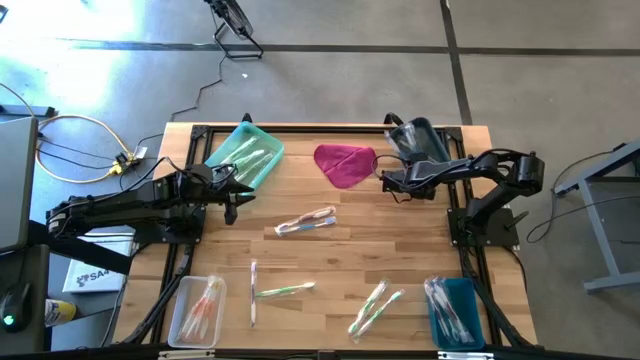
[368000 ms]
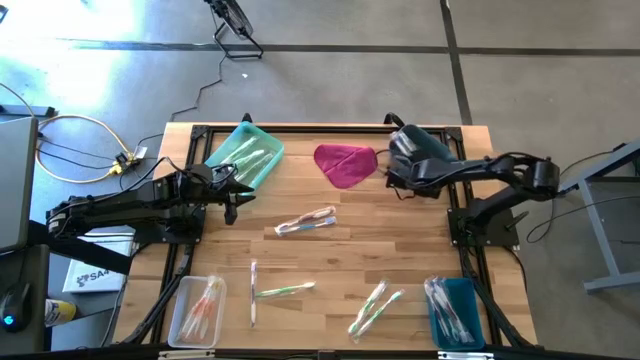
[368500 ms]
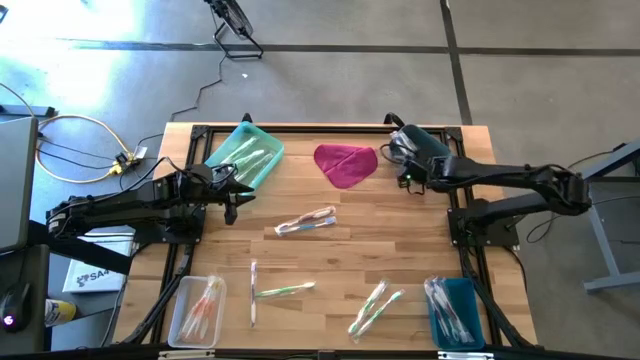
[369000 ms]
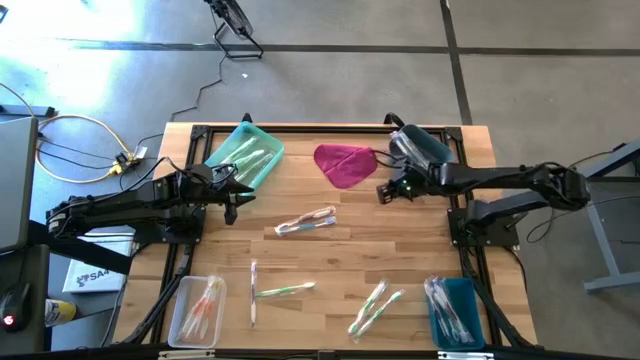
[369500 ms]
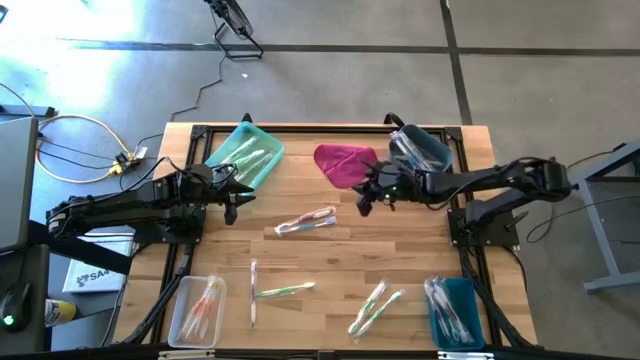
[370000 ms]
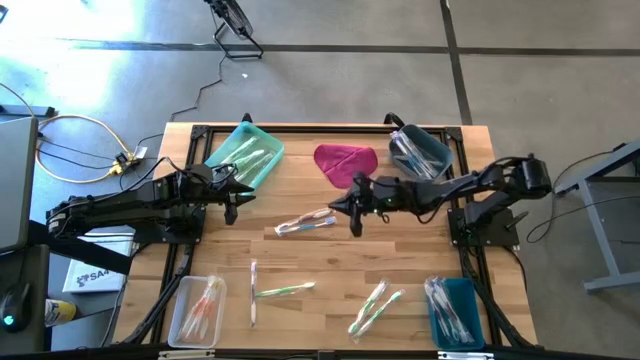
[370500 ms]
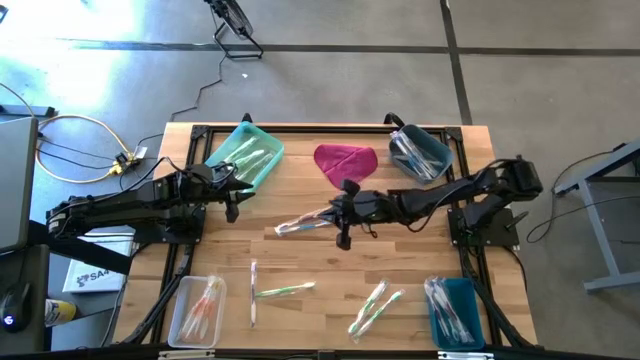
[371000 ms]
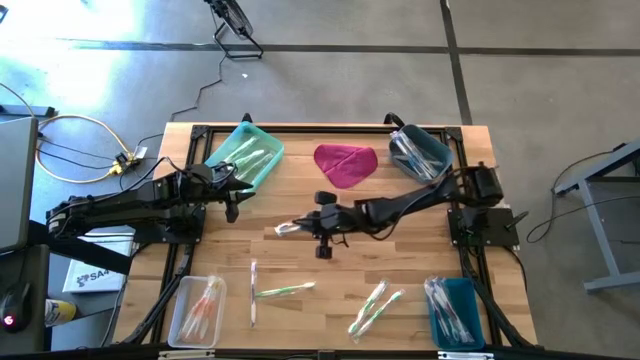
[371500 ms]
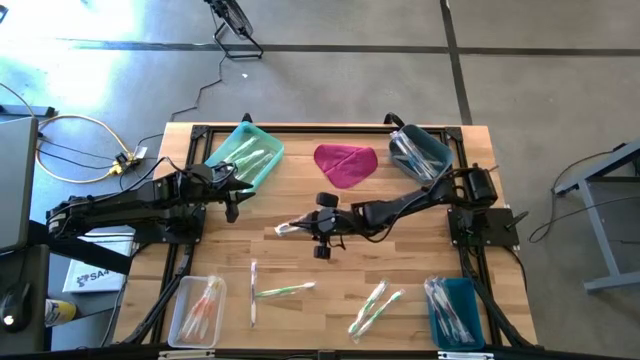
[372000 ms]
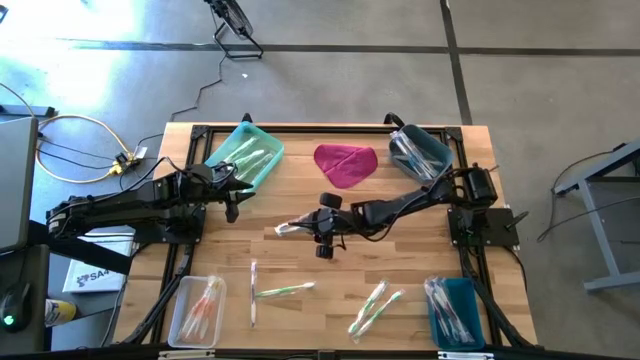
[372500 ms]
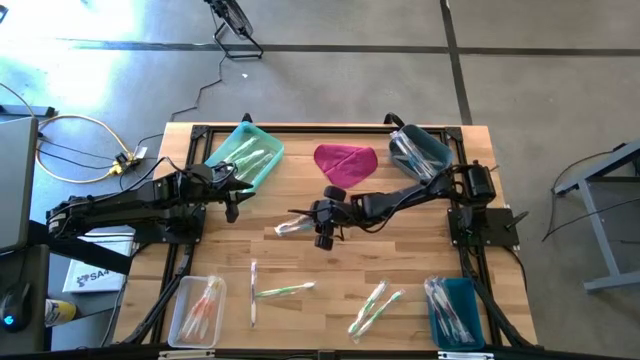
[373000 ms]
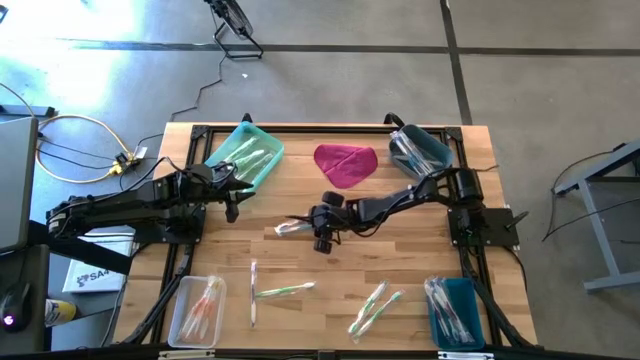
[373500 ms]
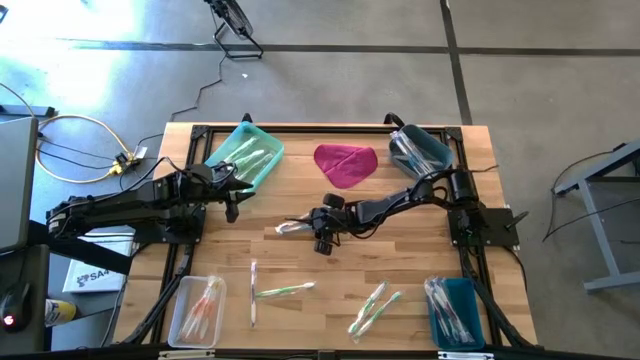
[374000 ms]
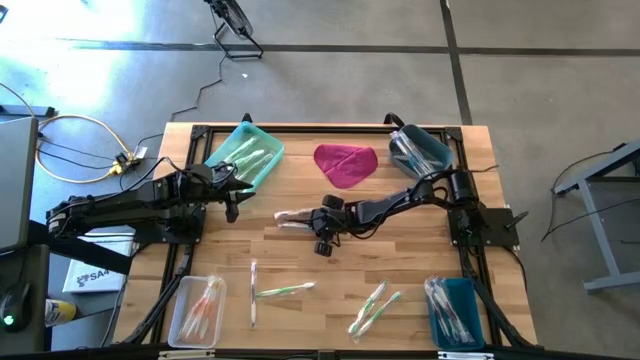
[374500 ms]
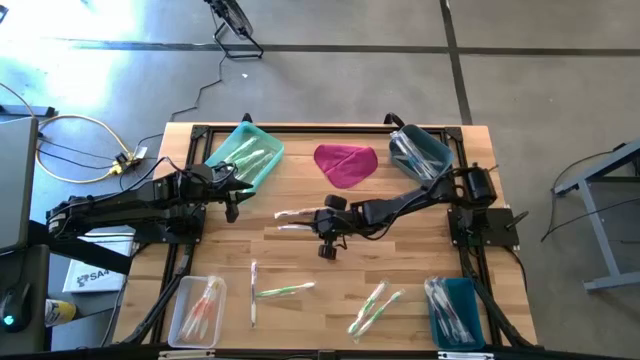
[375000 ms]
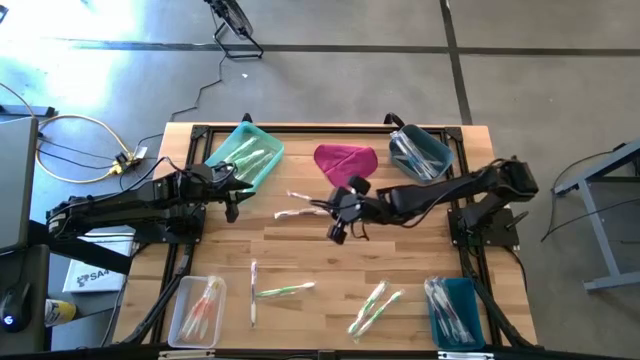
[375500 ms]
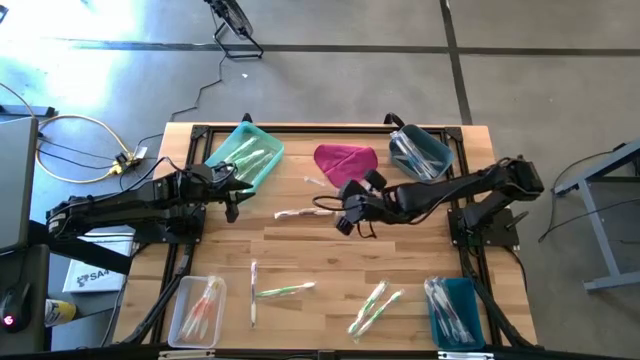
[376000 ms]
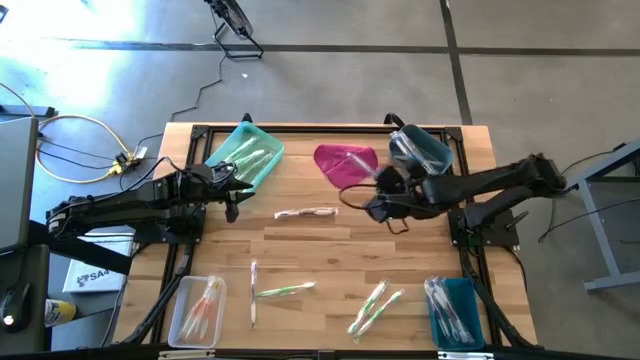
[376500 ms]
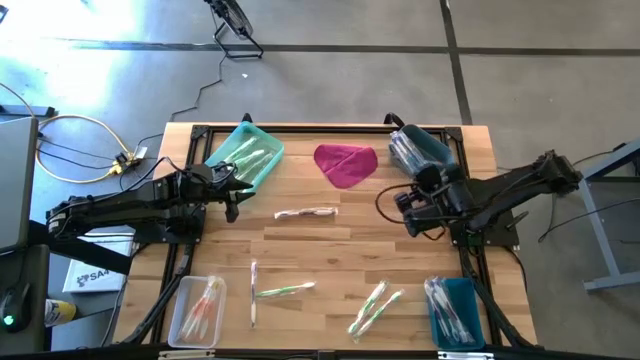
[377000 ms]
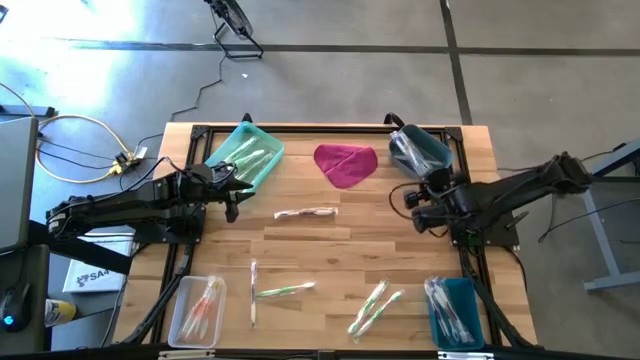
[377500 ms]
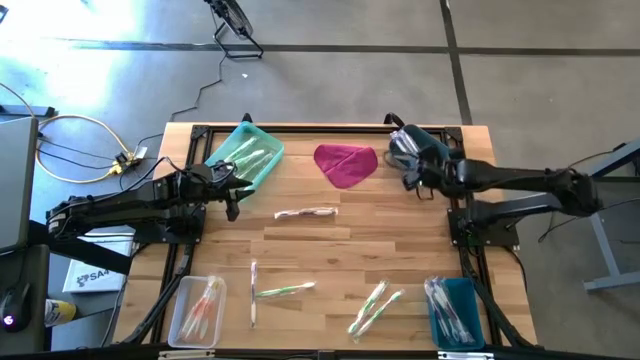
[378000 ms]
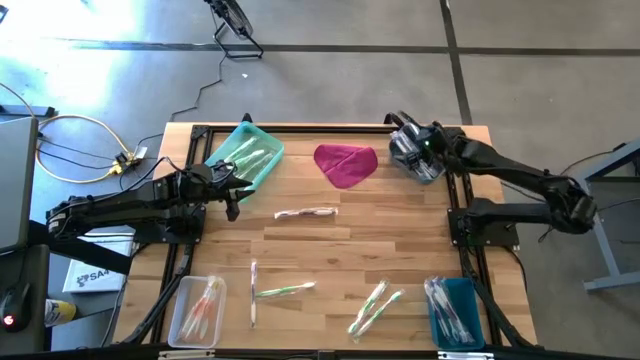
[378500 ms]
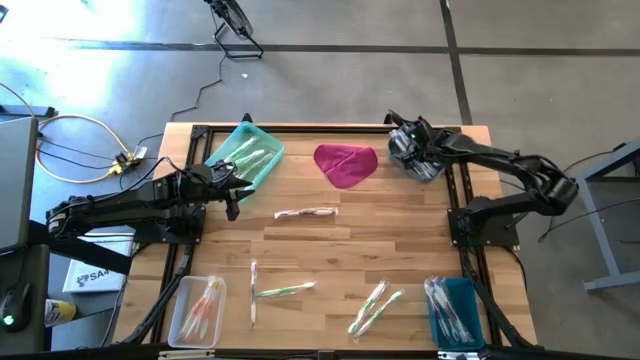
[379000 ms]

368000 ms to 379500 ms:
Task: Pick & Place Toothbrushes
Put the blue toothbrush to the light blue bin

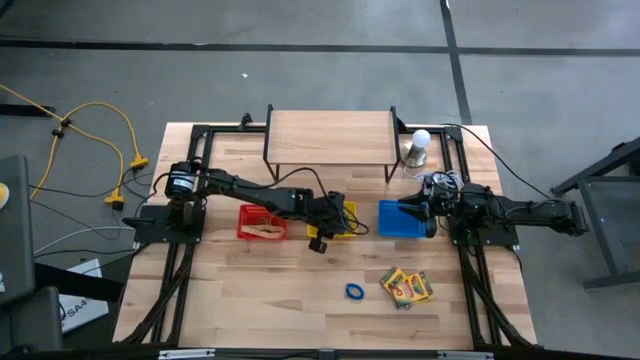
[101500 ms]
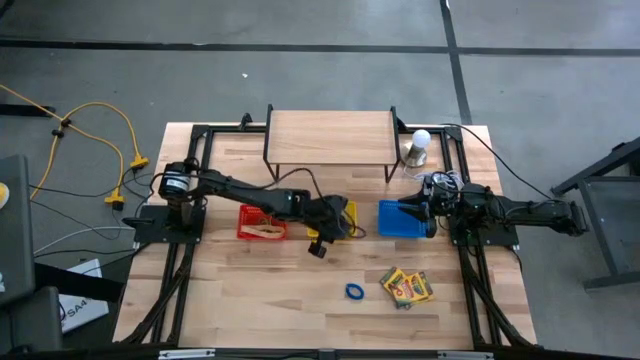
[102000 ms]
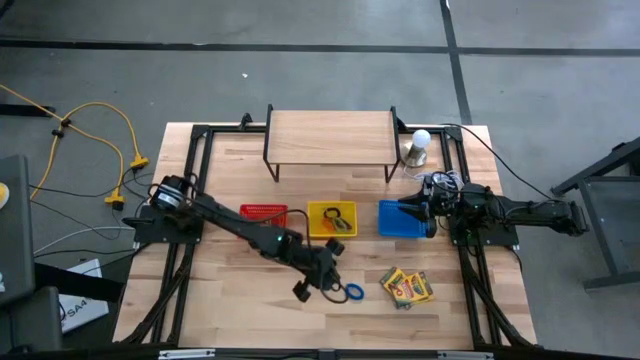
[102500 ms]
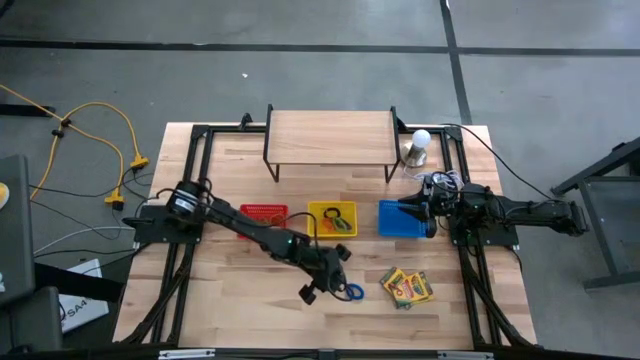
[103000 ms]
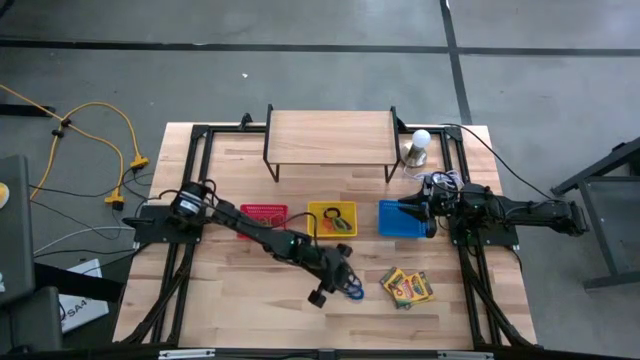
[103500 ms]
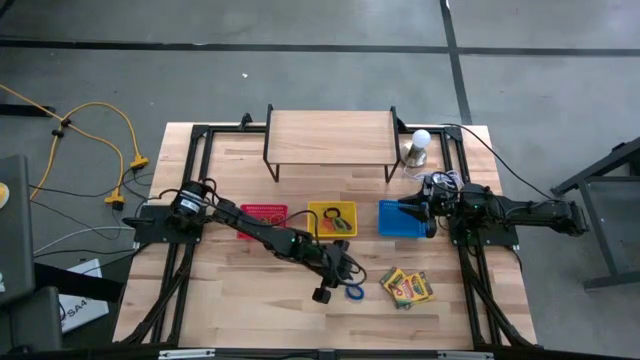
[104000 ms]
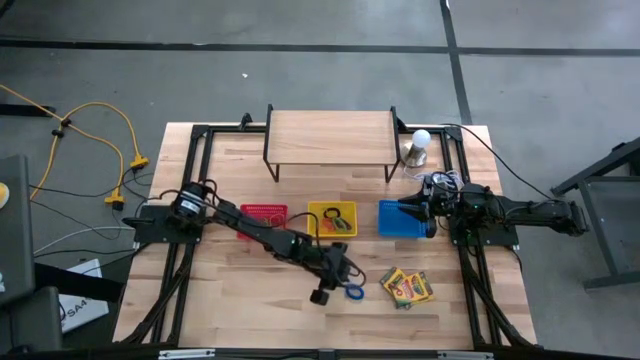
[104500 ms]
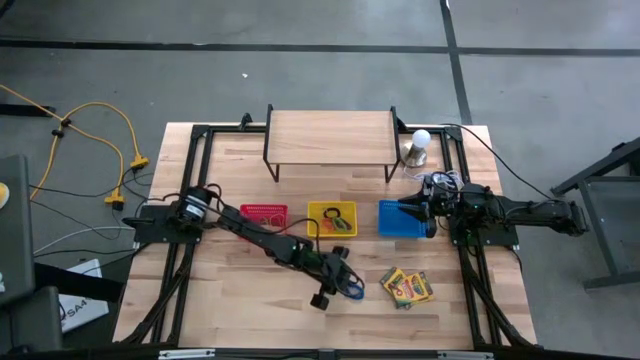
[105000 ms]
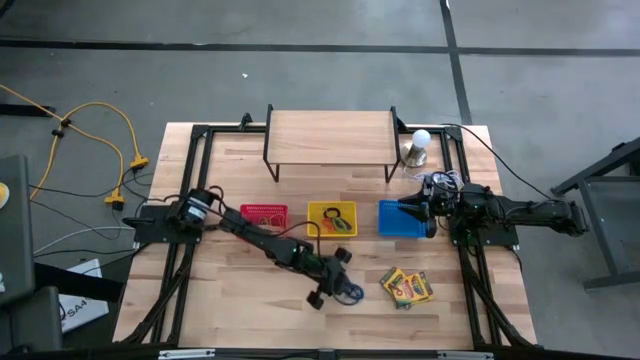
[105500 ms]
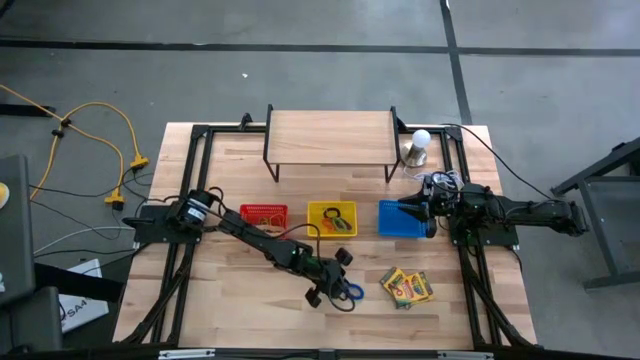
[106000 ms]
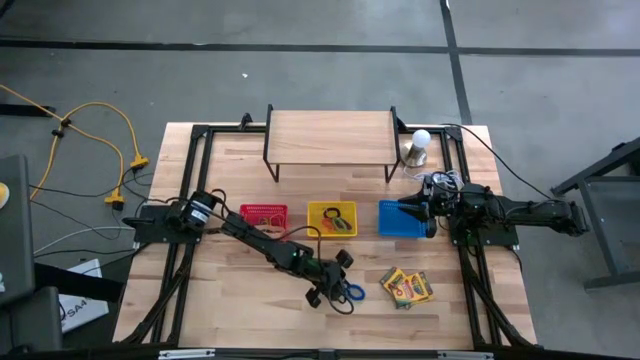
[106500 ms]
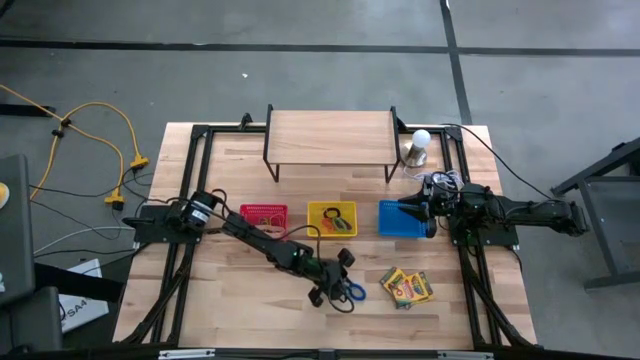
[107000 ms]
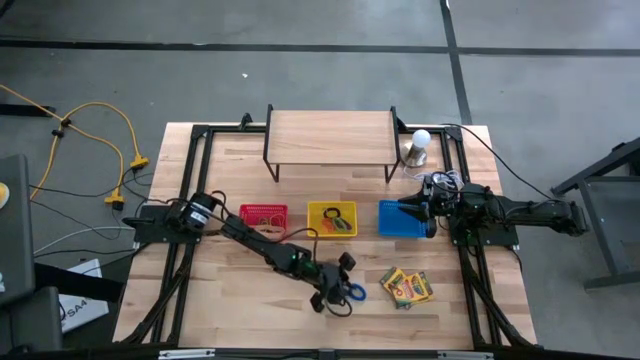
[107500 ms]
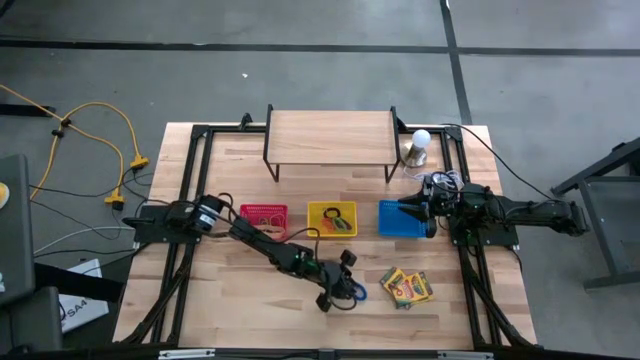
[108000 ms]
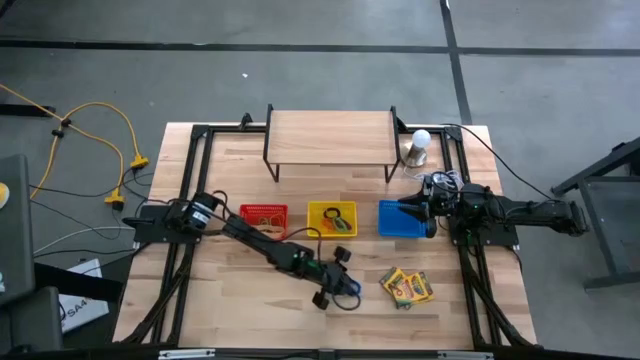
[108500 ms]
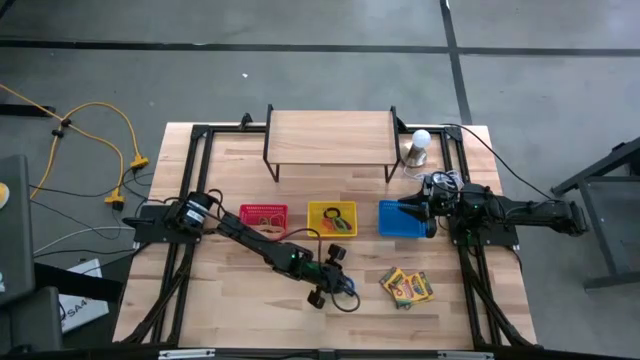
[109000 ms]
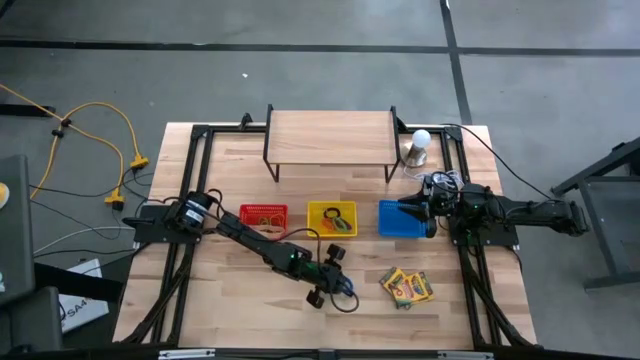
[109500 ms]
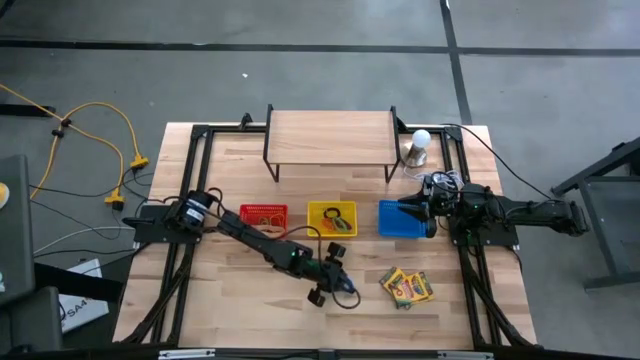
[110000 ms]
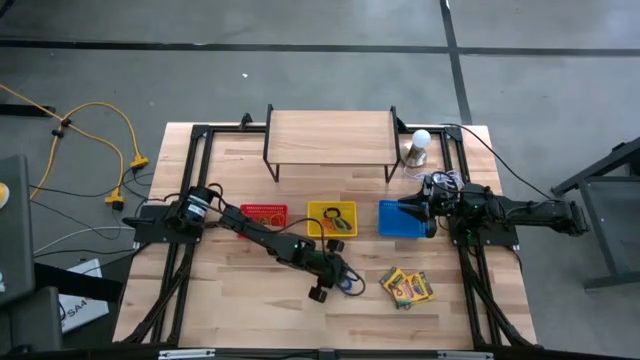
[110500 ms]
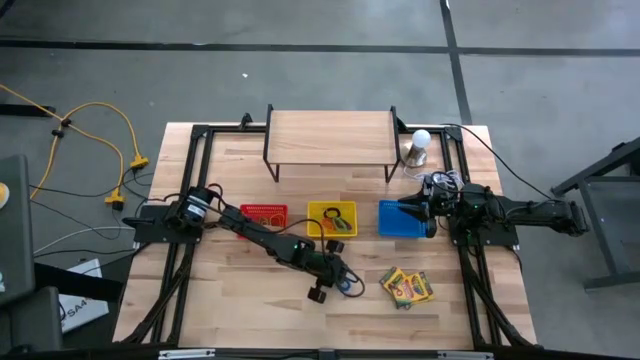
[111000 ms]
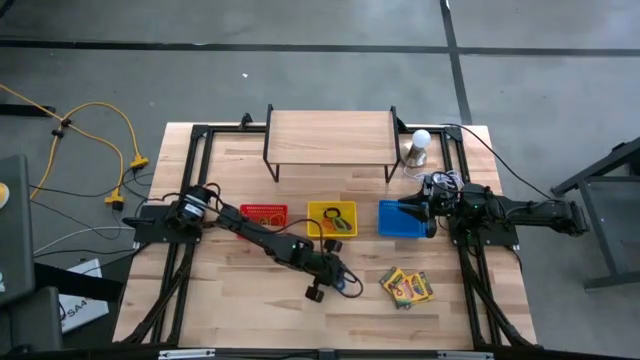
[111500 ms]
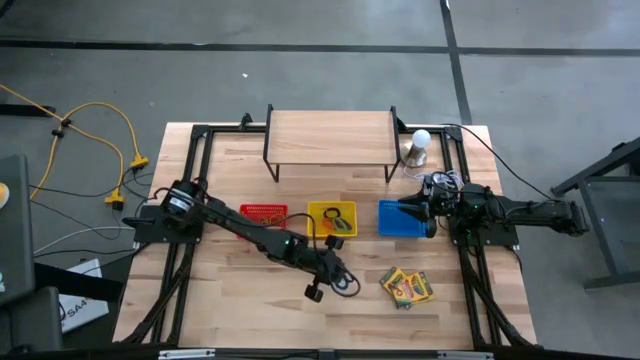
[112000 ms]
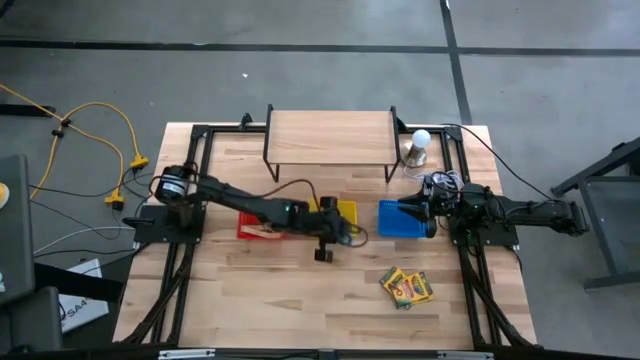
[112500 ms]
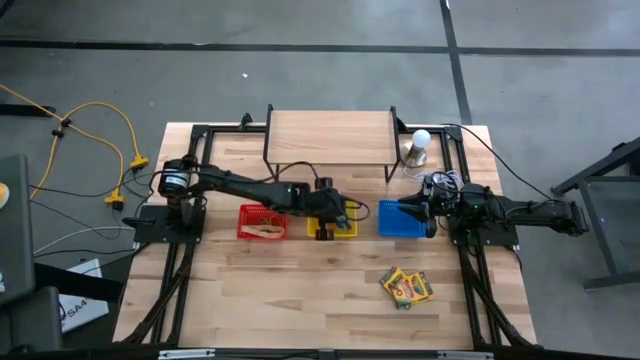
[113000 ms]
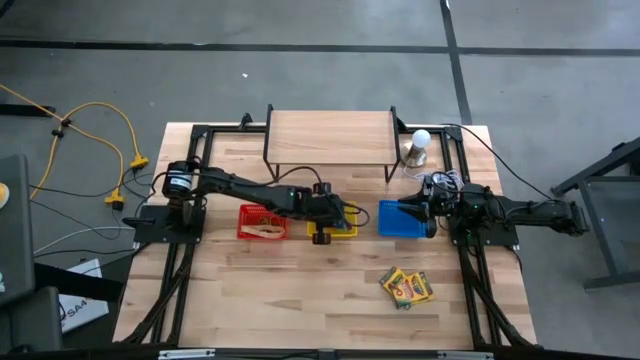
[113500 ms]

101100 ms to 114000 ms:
Task: Pick & Place Office Desk Supplies
Put the blue spring keychain into the yellow bin
